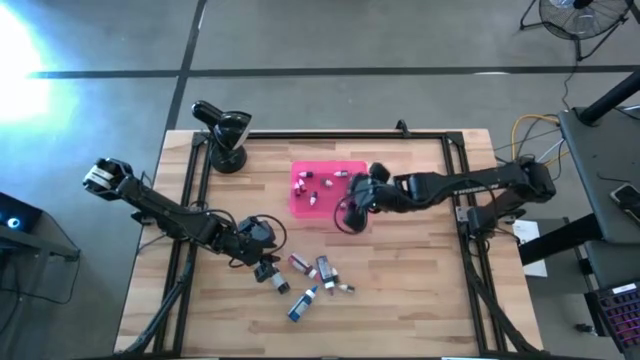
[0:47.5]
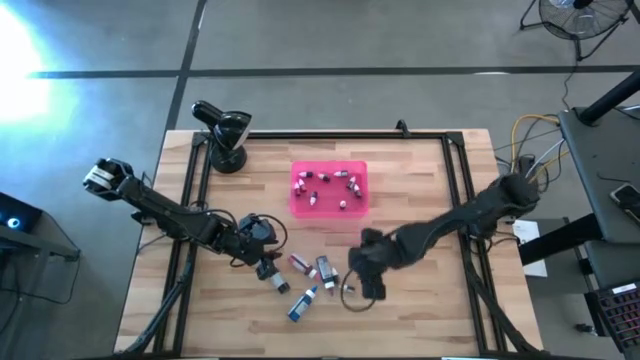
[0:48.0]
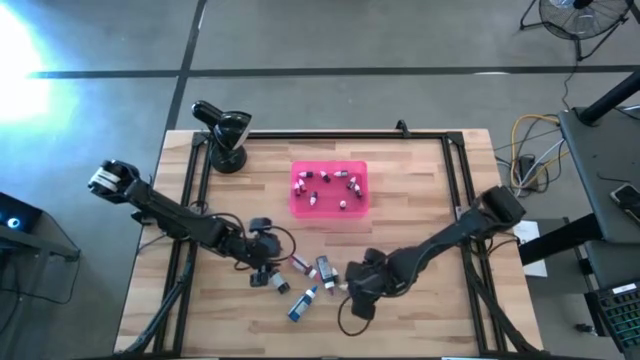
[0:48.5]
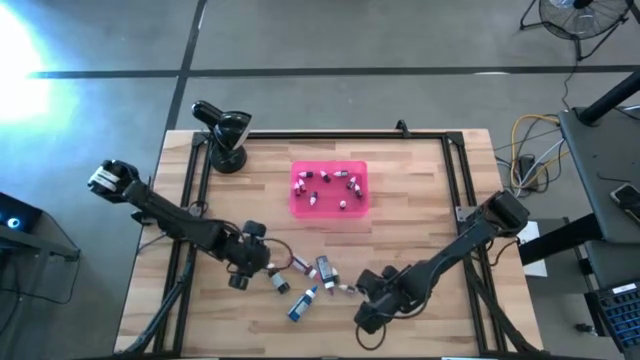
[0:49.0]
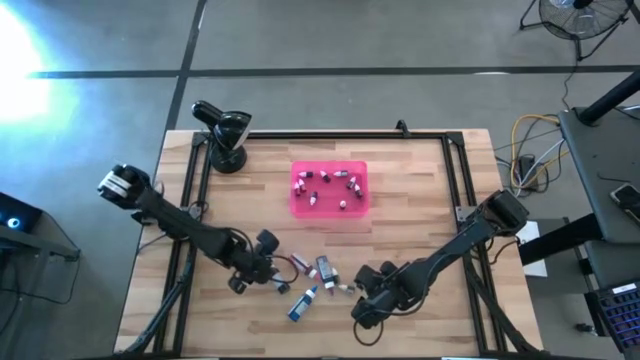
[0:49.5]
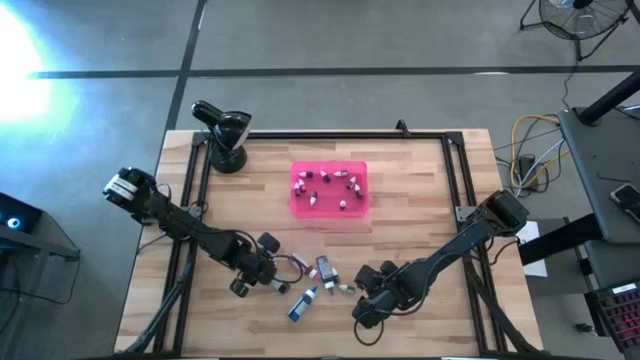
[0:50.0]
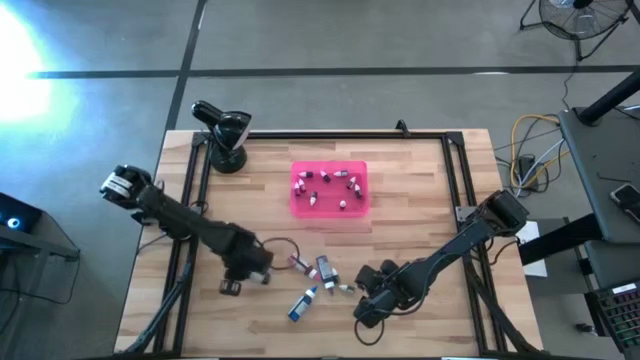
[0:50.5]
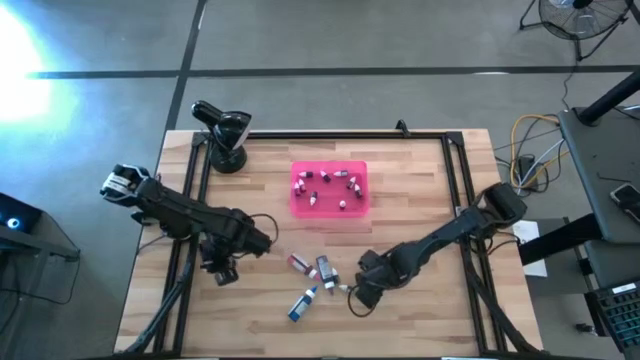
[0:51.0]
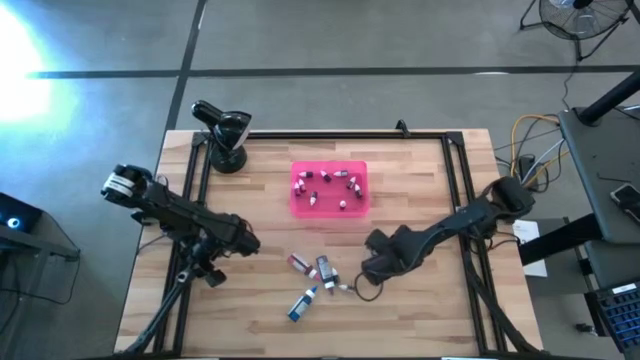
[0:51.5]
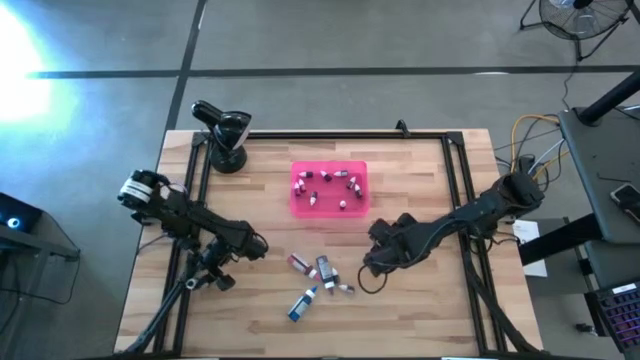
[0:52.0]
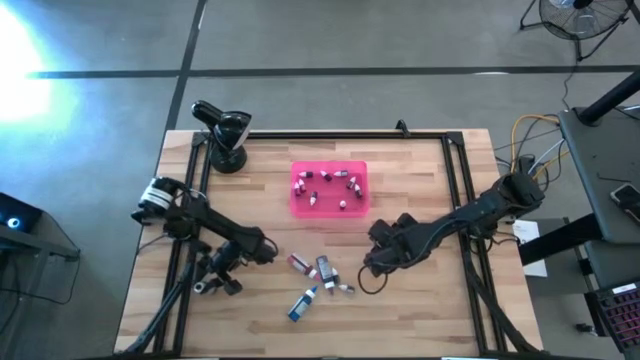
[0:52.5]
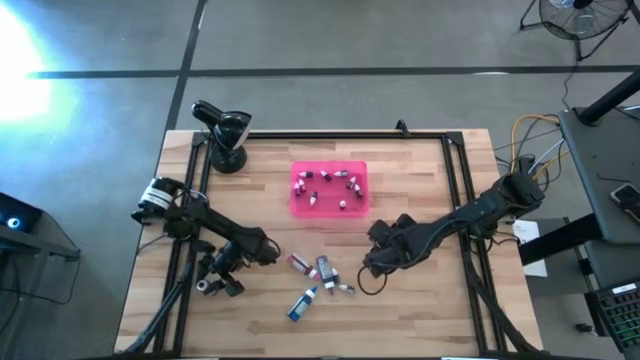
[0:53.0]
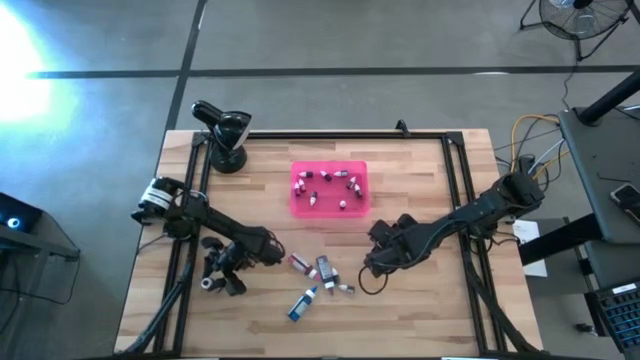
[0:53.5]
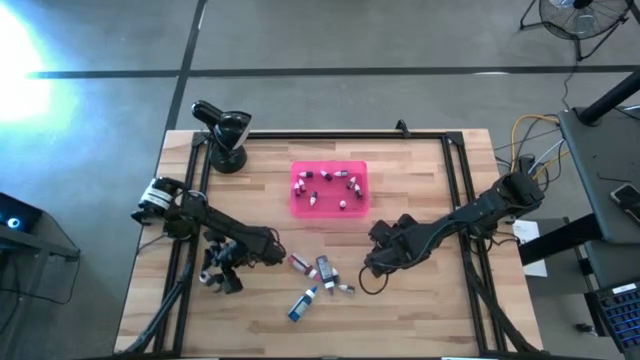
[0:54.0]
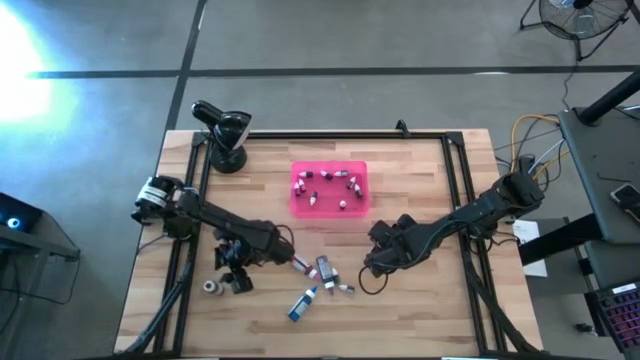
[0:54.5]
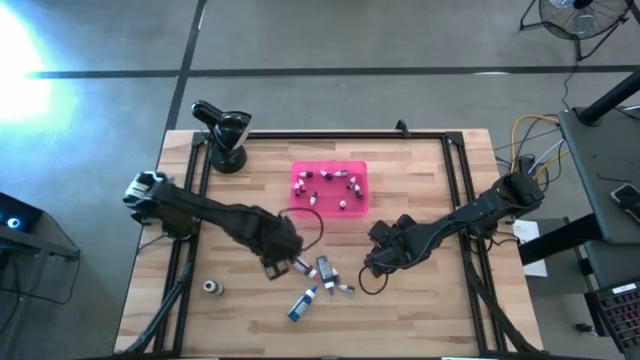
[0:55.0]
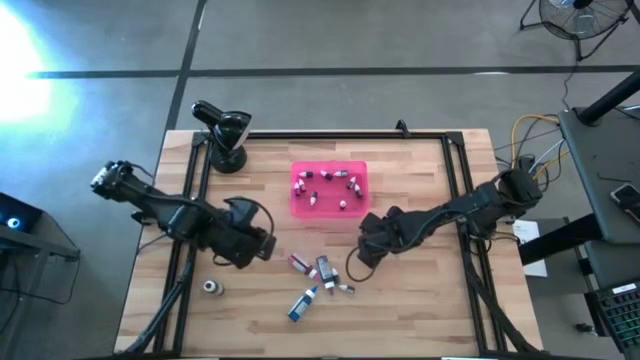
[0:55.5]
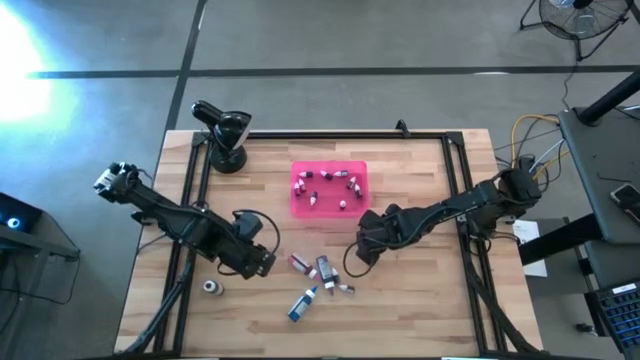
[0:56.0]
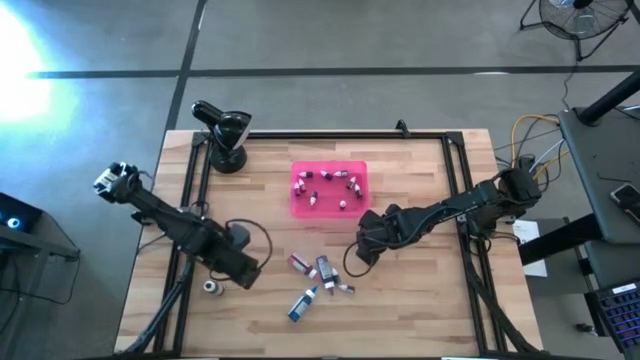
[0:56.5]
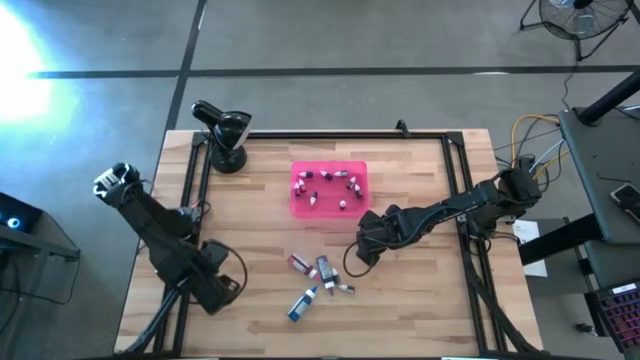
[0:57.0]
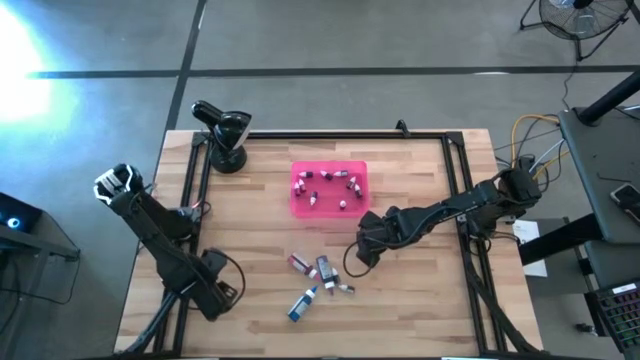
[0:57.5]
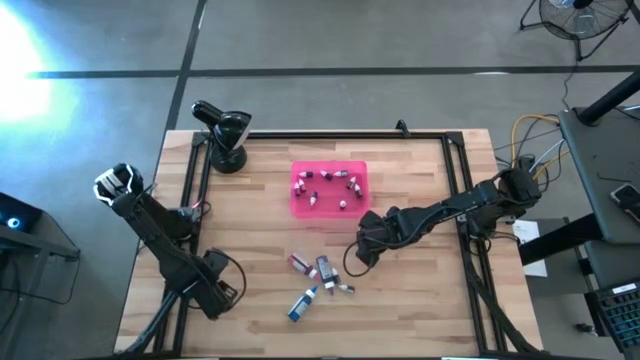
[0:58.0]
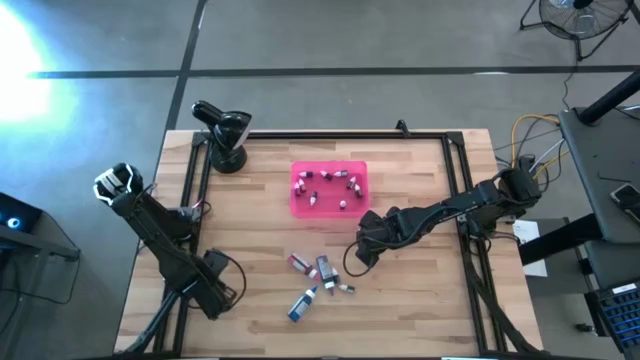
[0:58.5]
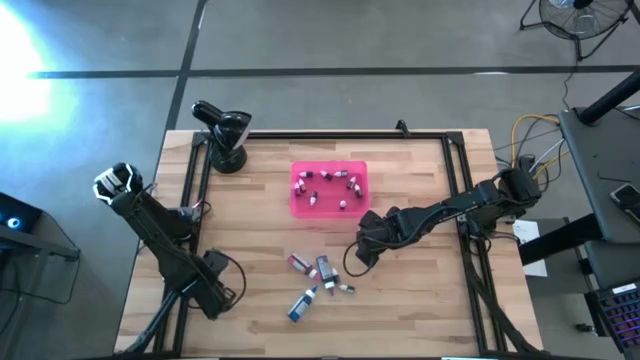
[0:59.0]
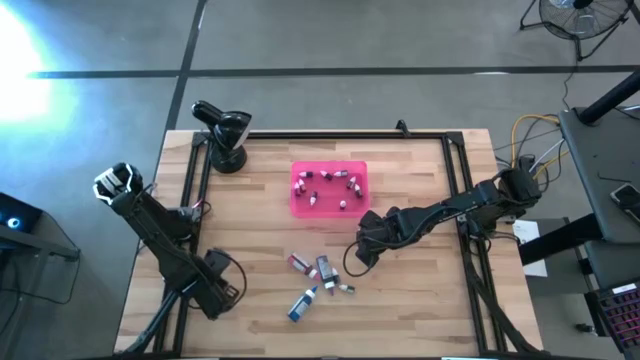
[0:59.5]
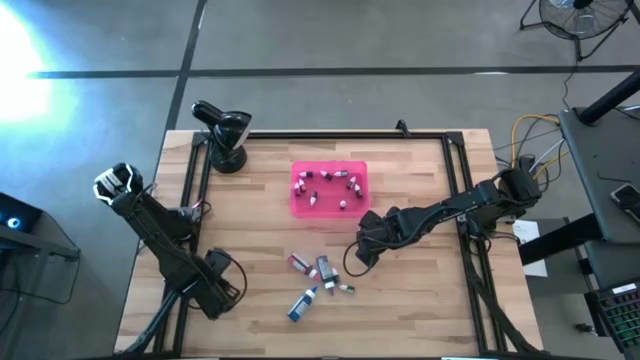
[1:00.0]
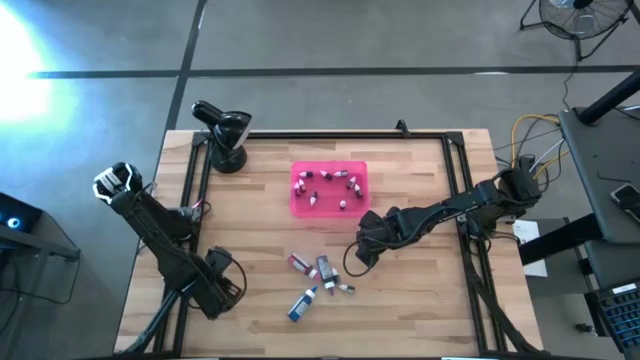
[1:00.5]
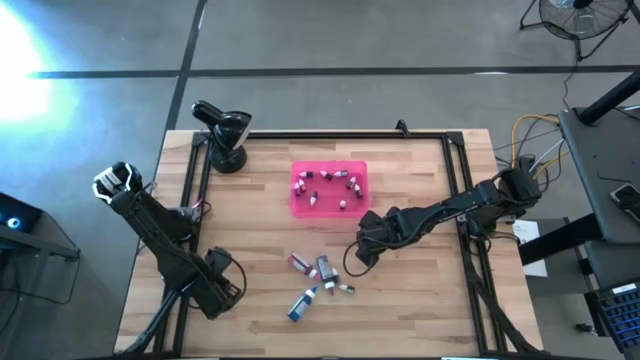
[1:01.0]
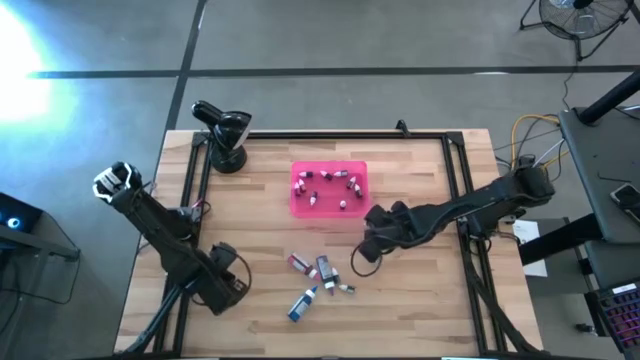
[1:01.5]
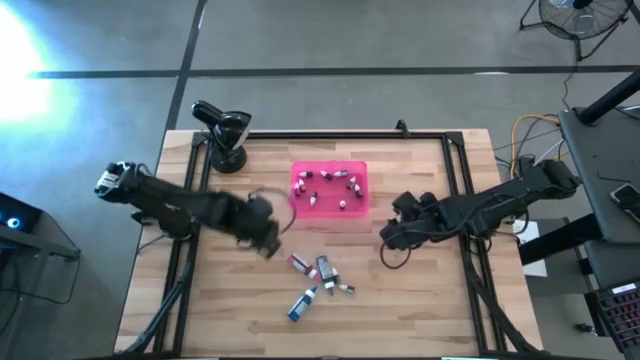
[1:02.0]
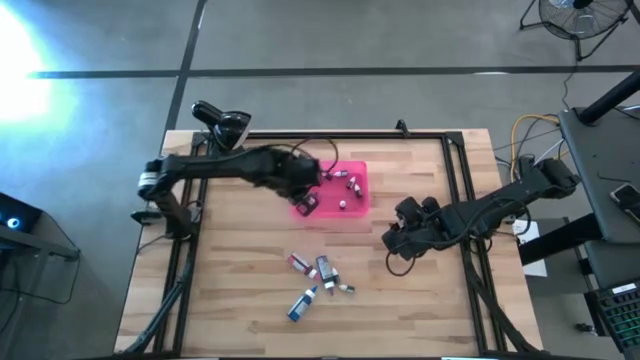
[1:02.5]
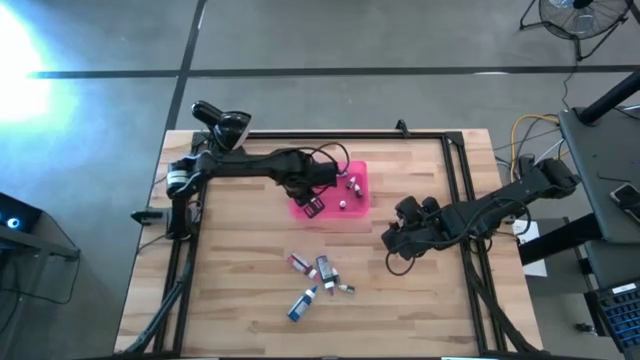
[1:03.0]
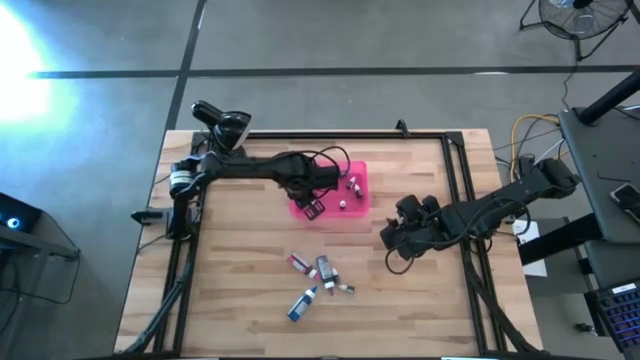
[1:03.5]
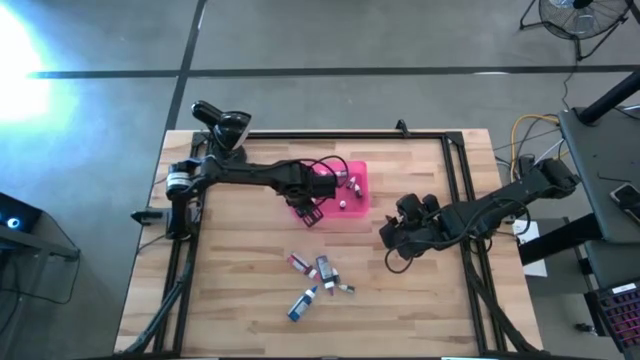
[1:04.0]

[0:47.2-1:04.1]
Task: Pick & Place food coloring
Put the black food coloring bottle into the pink bin

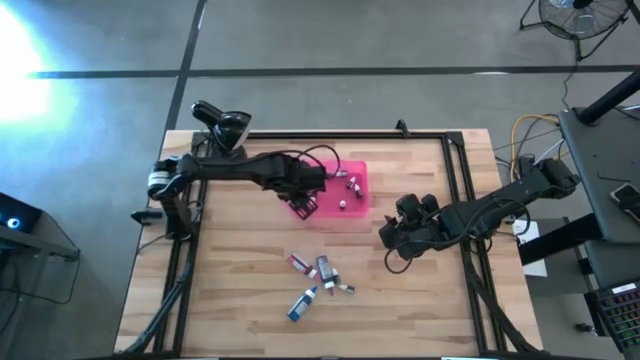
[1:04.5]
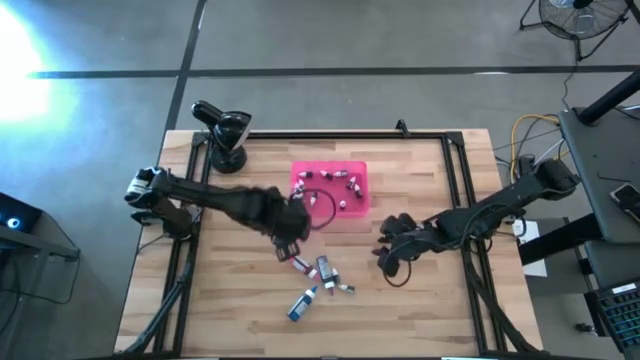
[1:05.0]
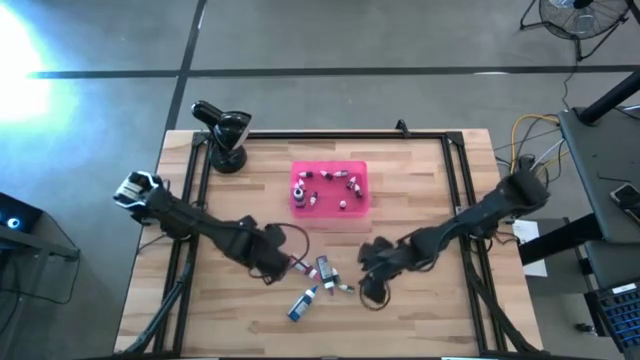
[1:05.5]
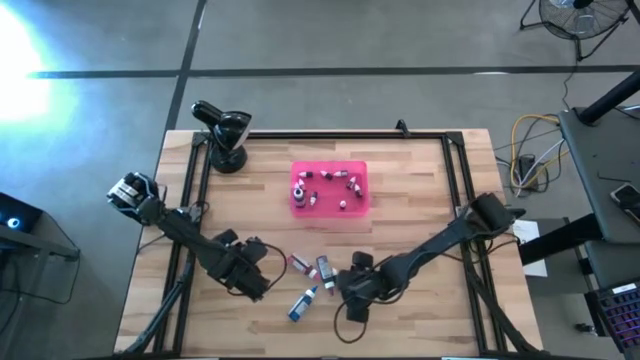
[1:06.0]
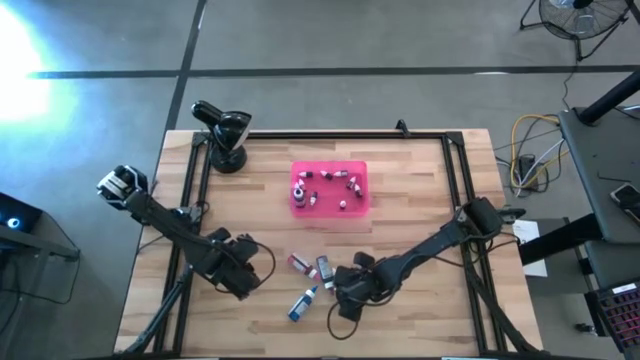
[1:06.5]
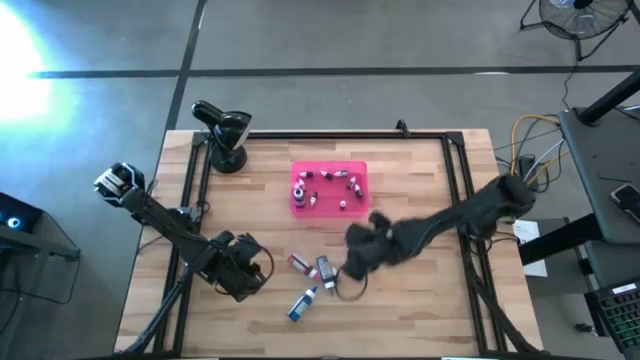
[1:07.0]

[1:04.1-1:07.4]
Put the blue food coloring bottle into the pink bin

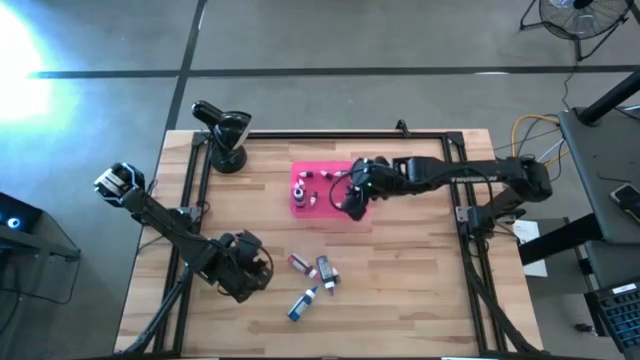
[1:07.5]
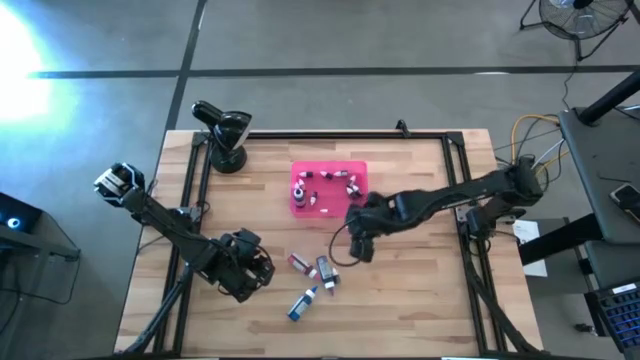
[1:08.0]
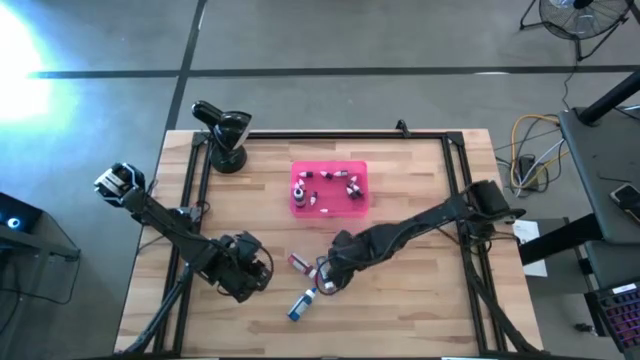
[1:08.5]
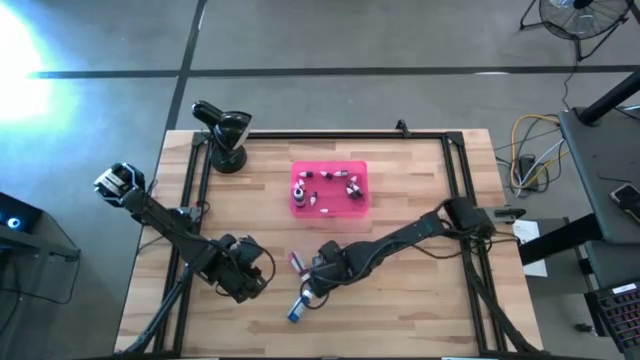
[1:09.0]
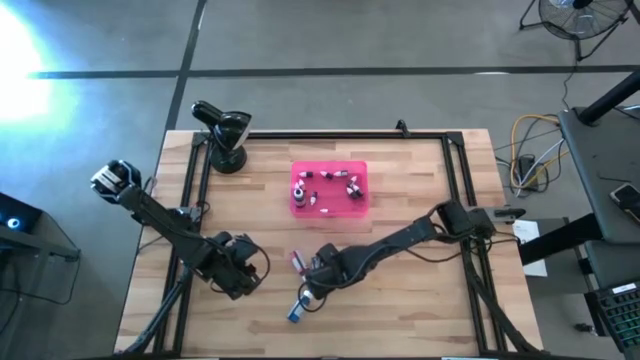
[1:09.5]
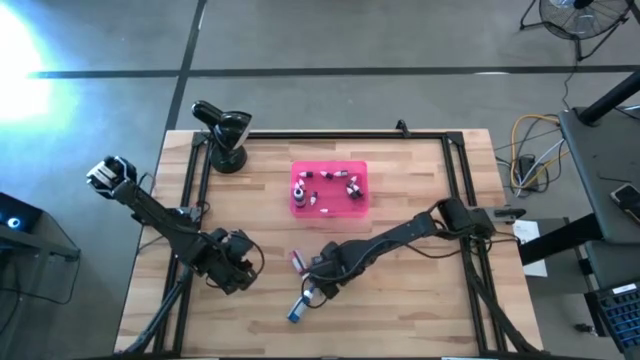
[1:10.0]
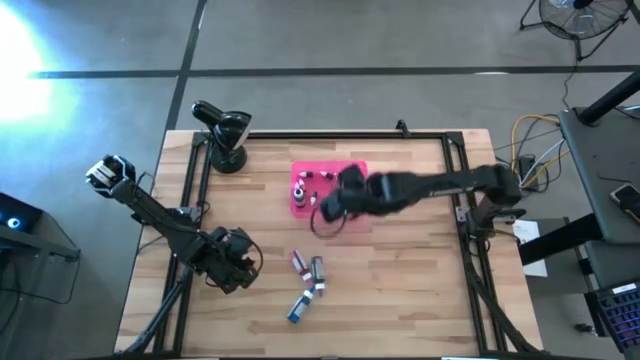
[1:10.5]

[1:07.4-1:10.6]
Put the blue food coloring bottle into the pink bin
